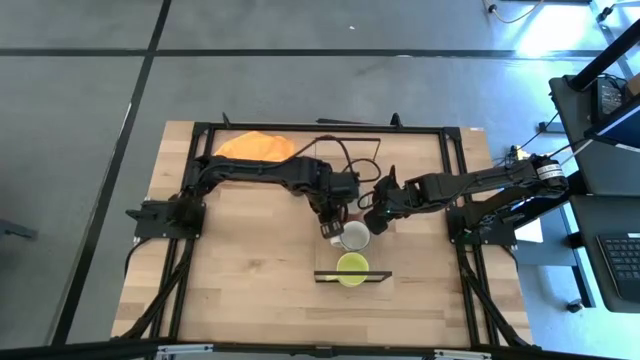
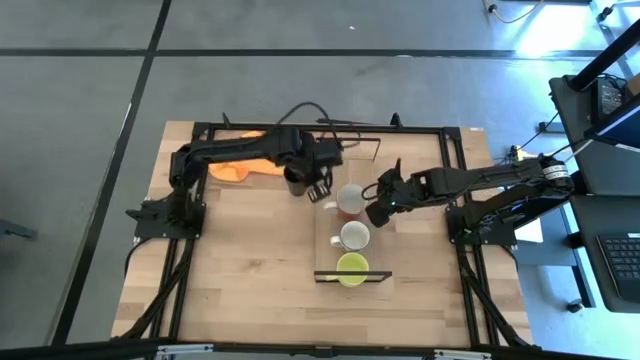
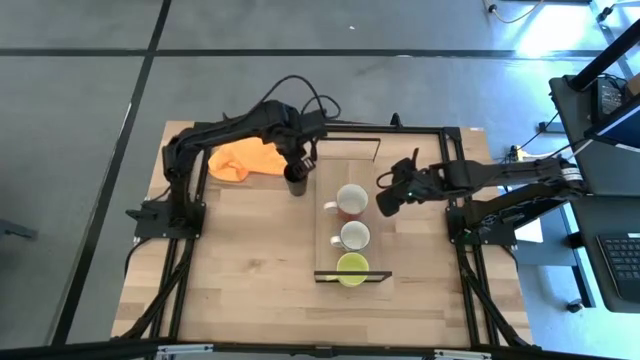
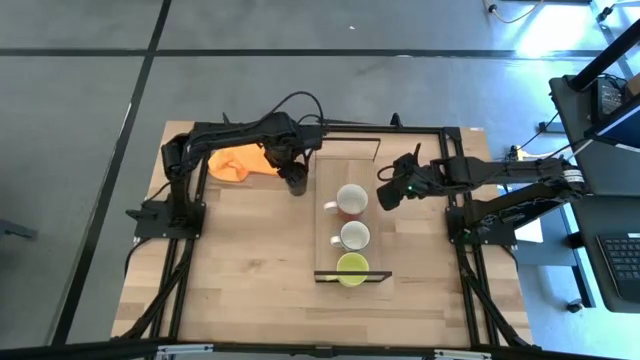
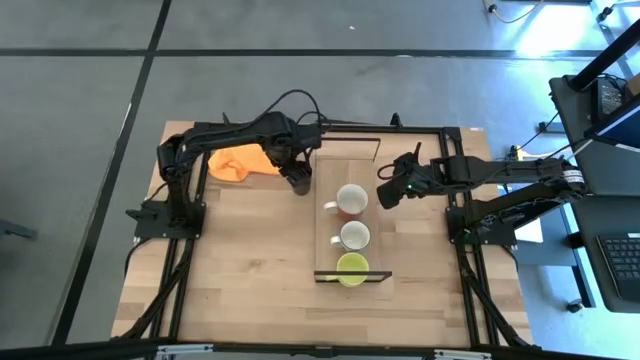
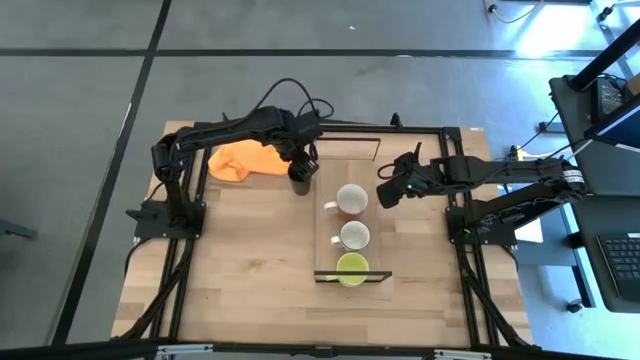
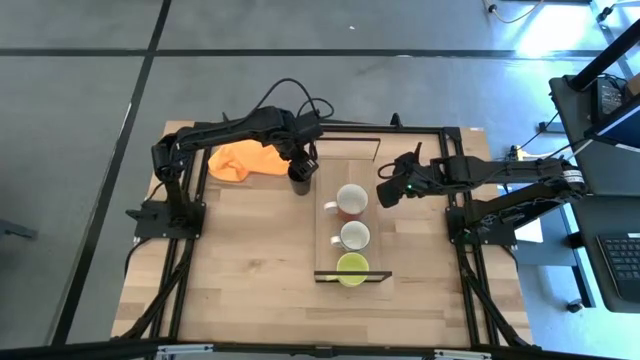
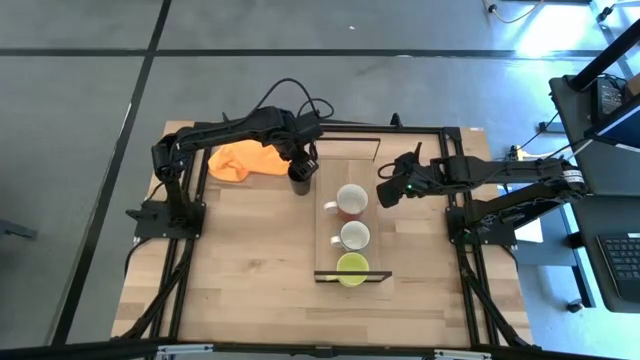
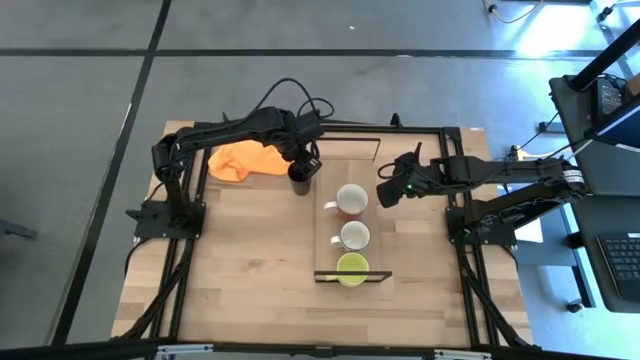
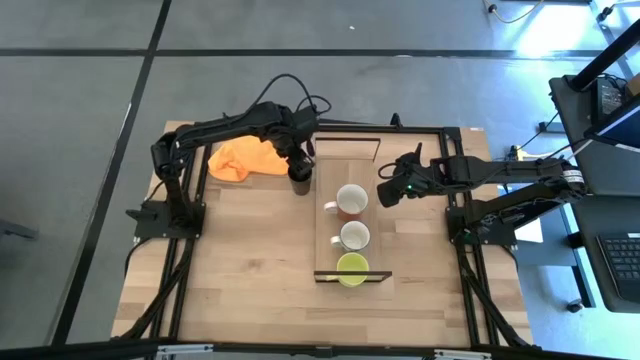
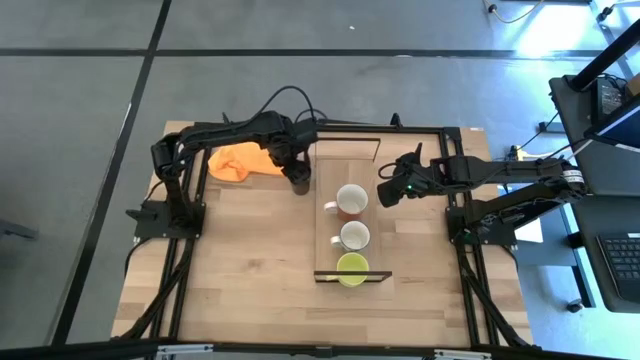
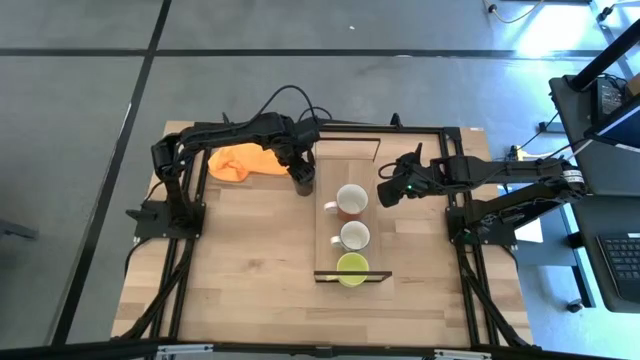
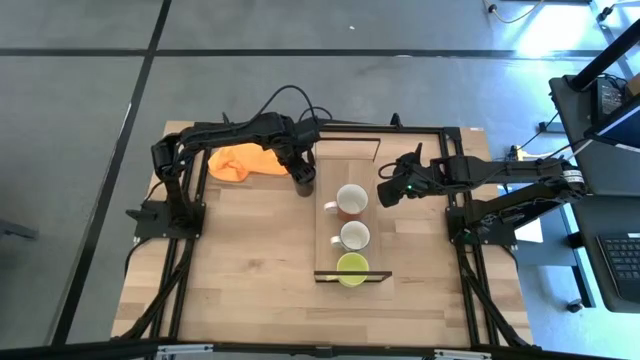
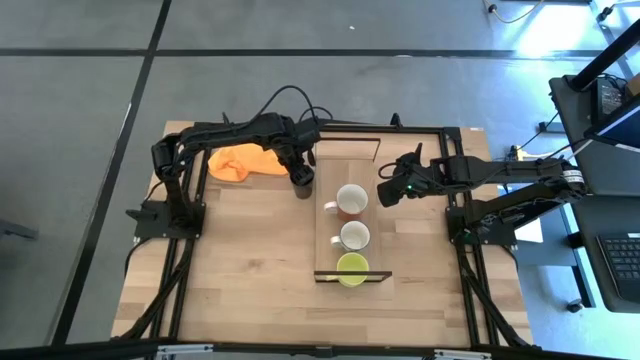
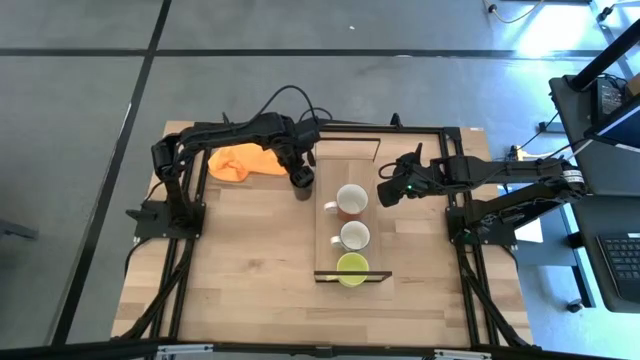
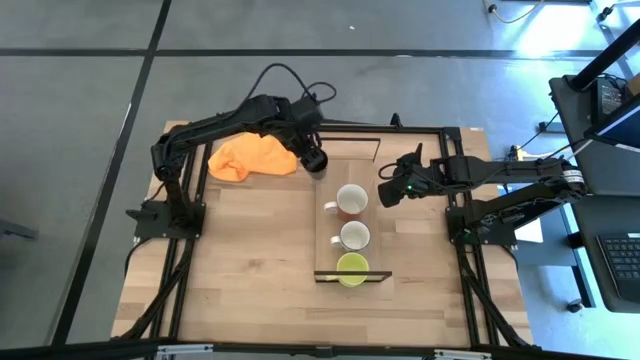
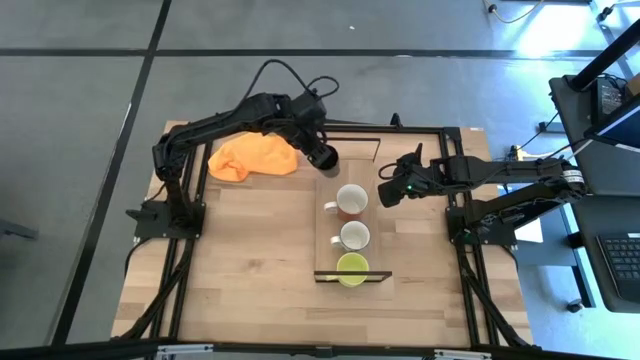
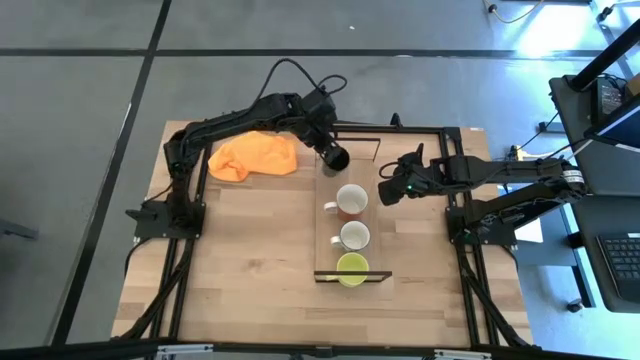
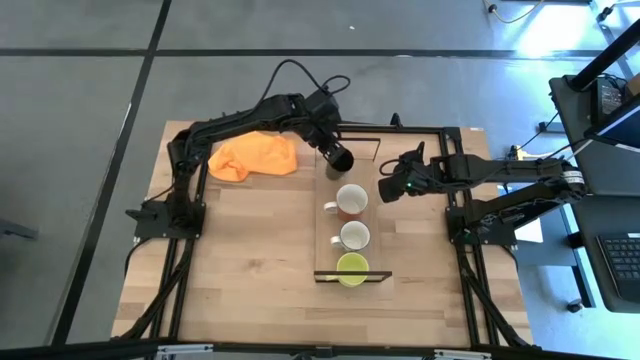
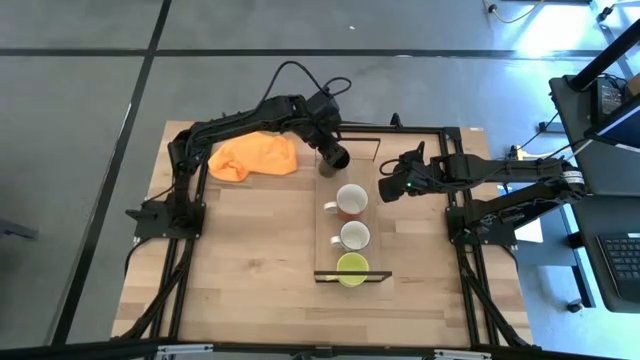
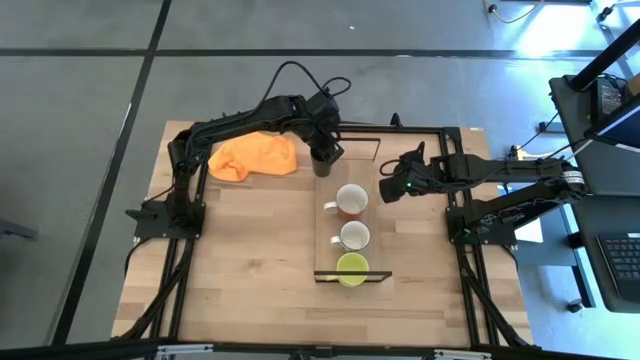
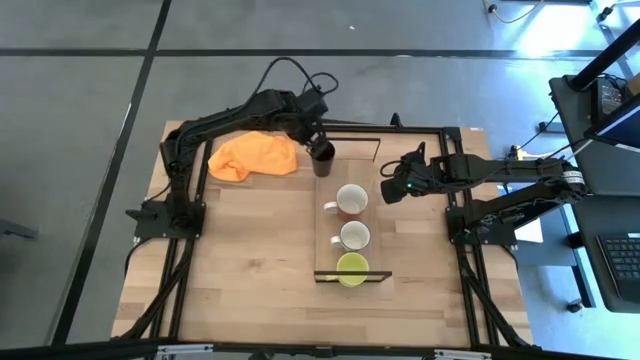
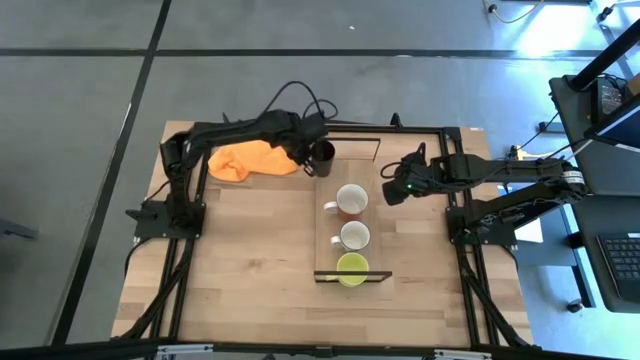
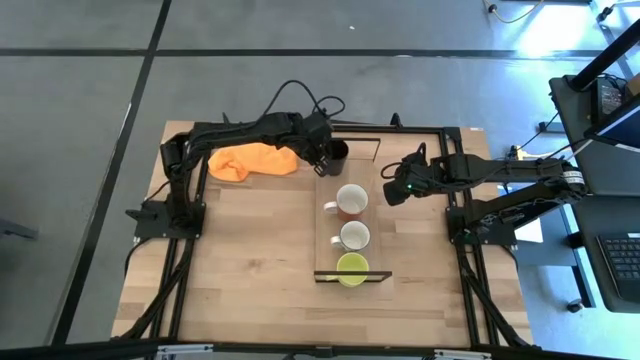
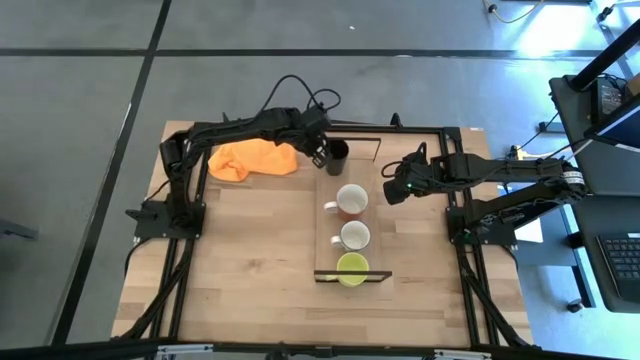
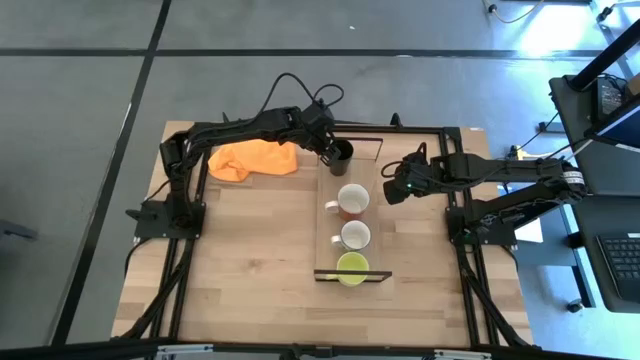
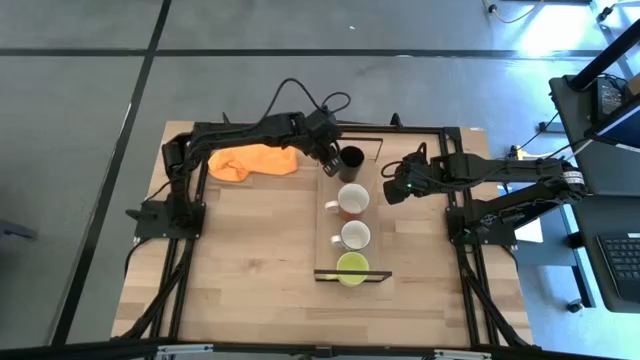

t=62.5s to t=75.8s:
Task: Stack small to large cups/mugs on shelf
Put the black cup on the shelf

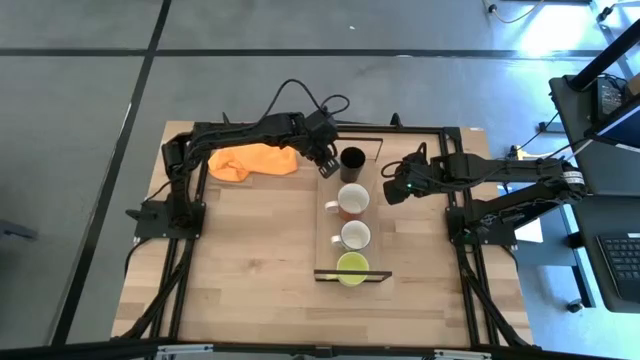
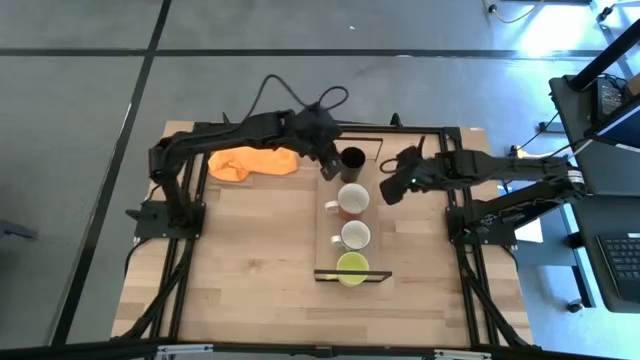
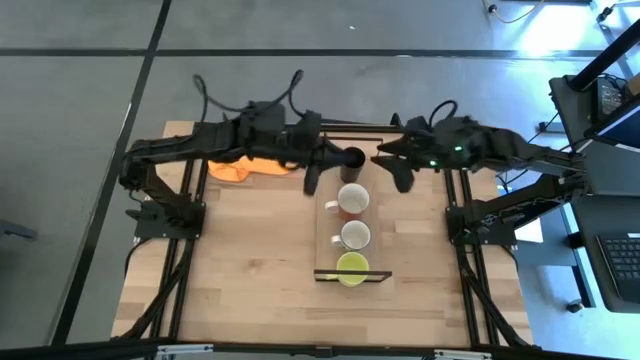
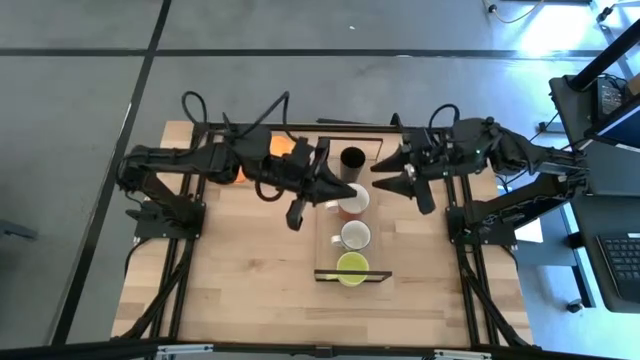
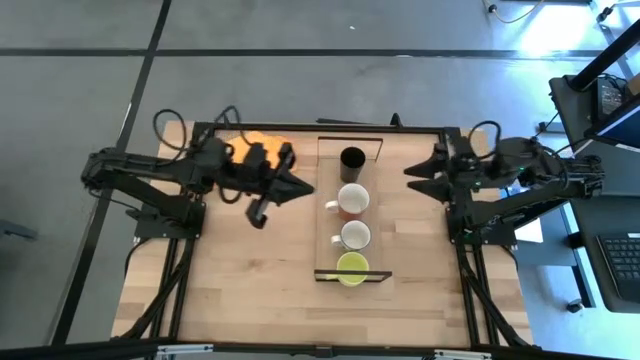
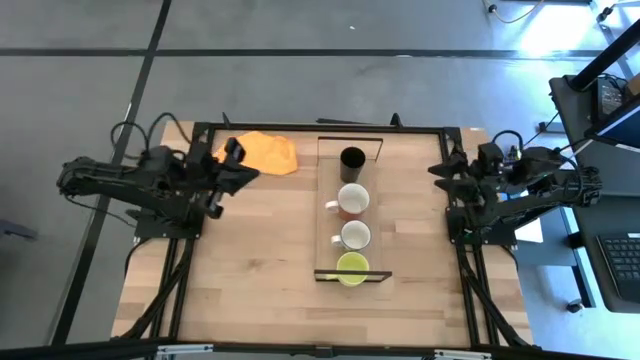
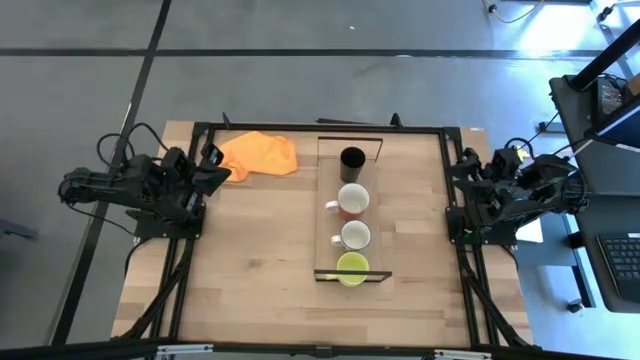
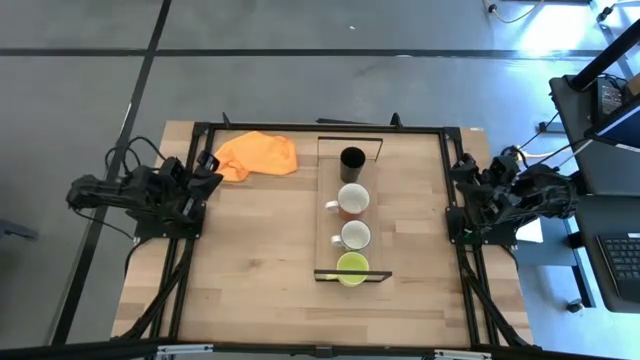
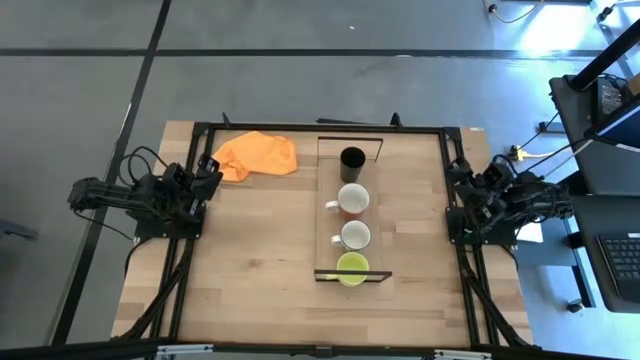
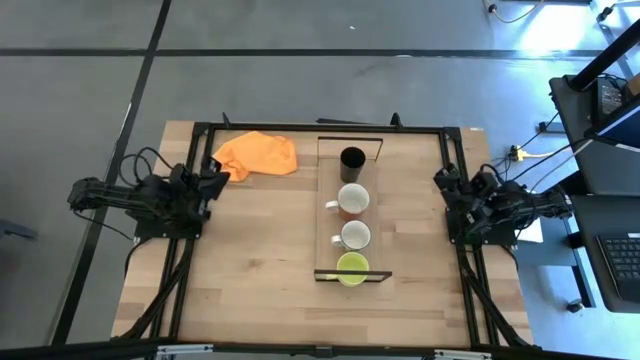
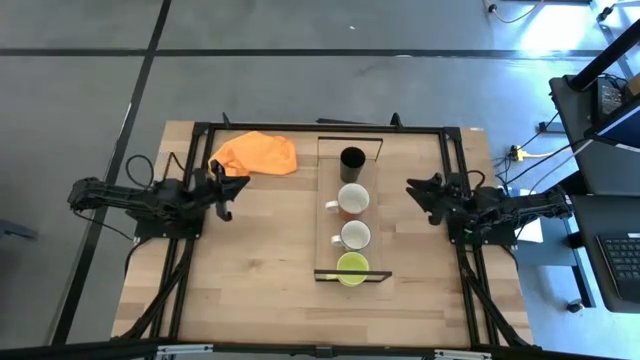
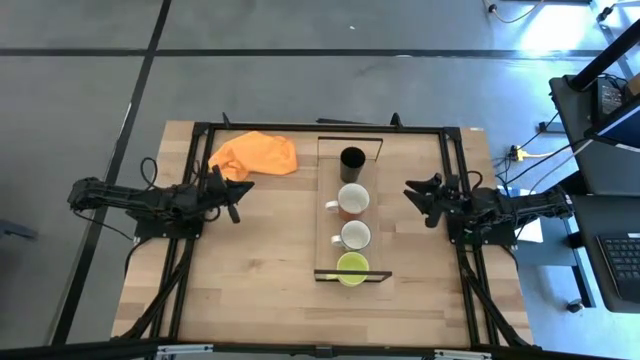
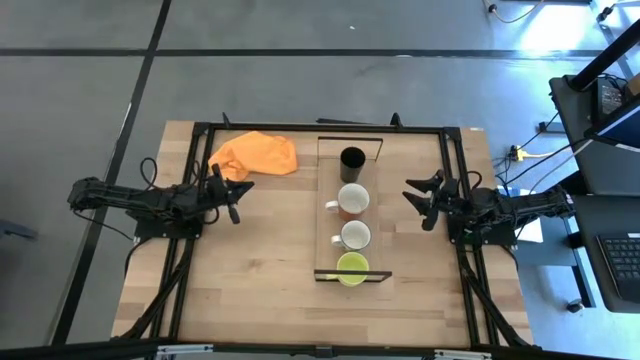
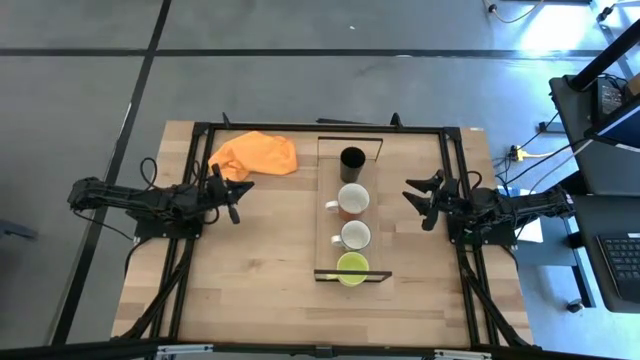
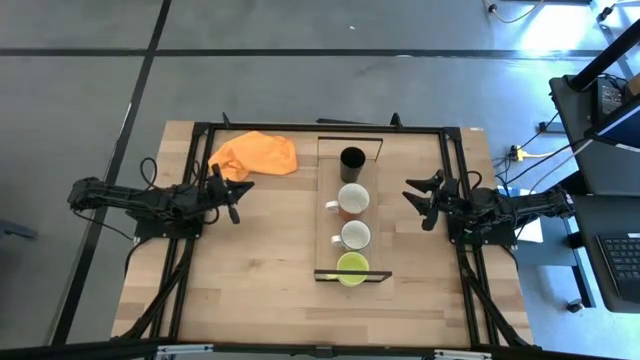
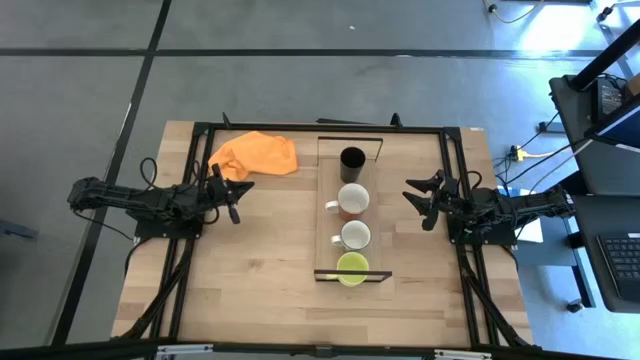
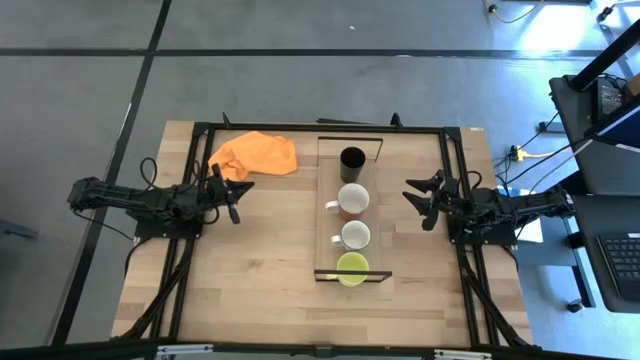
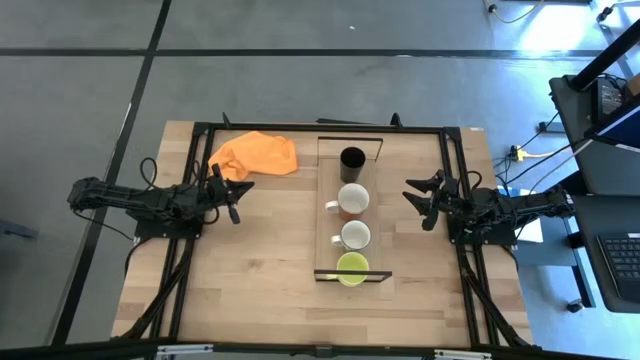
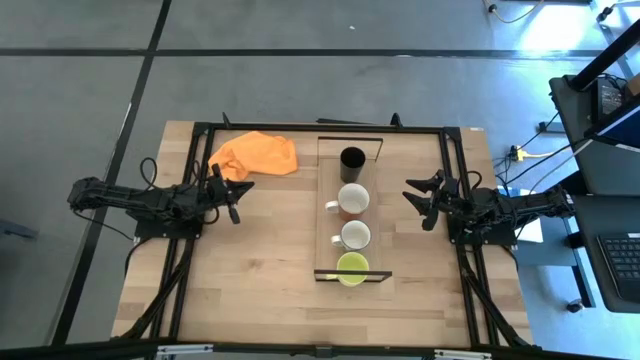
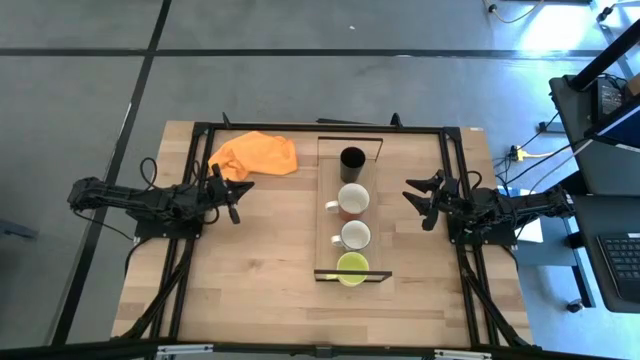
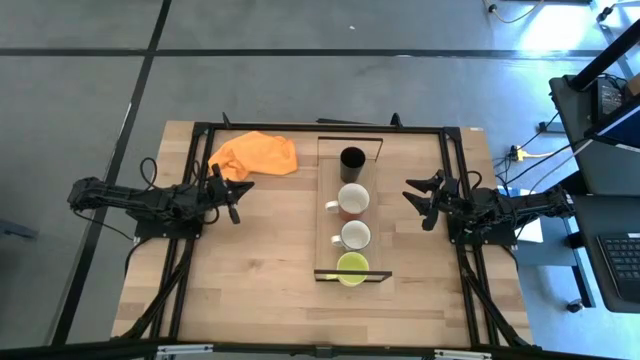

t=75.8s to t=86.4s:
Return to Home Position
